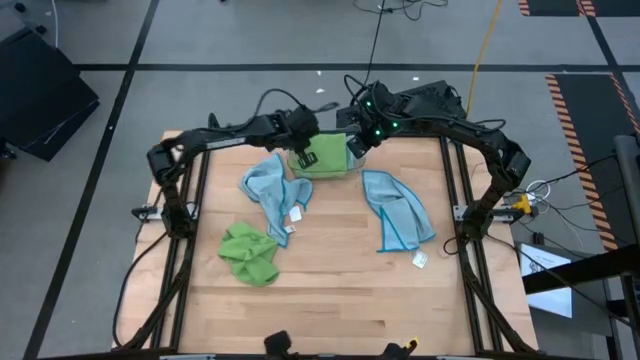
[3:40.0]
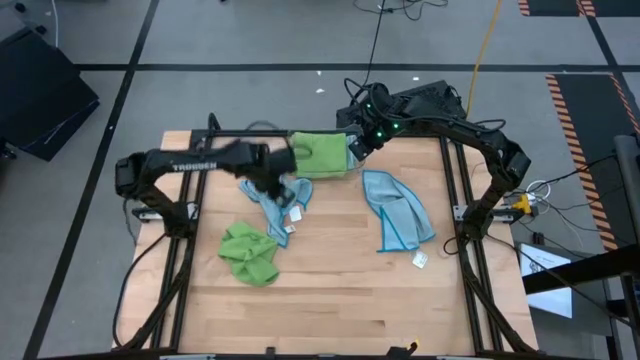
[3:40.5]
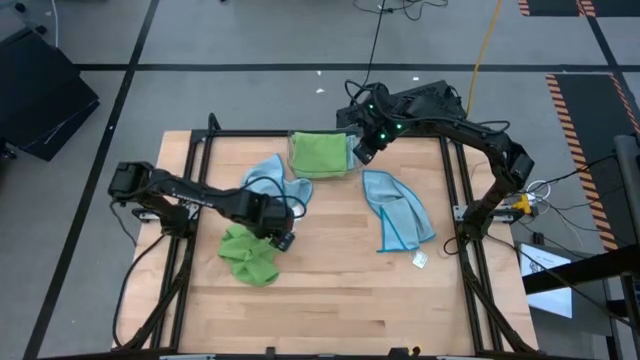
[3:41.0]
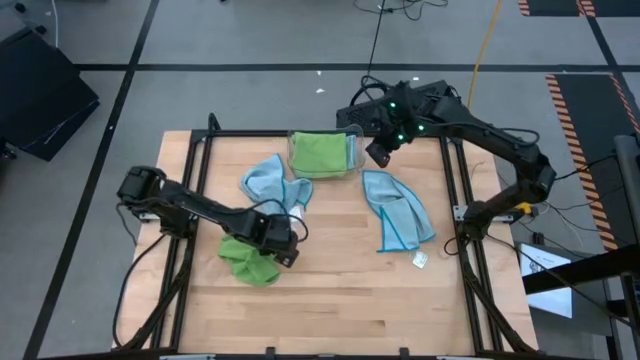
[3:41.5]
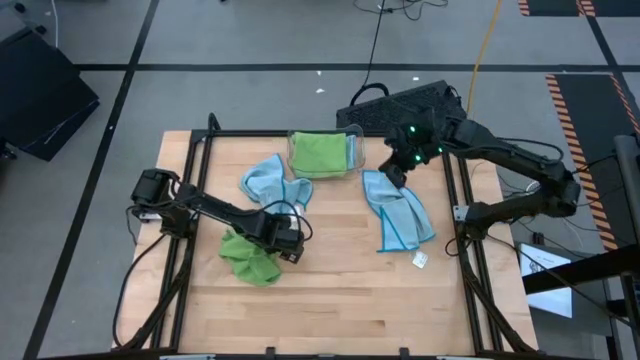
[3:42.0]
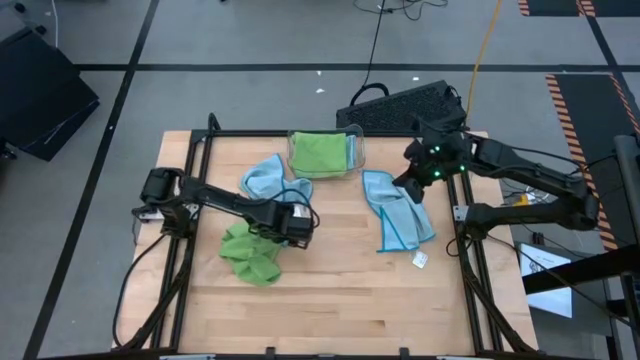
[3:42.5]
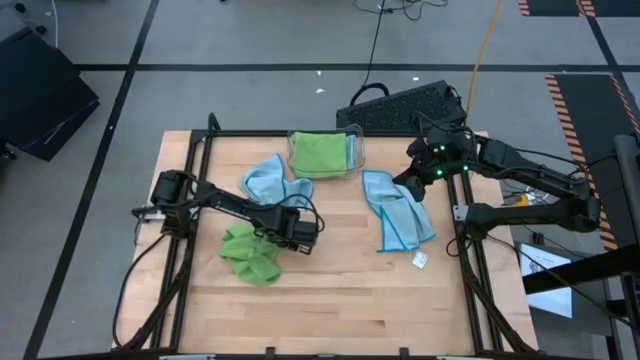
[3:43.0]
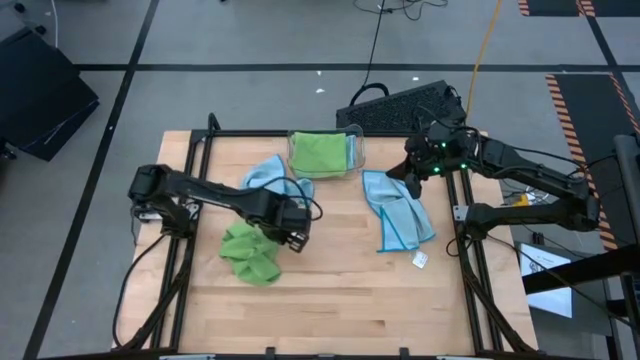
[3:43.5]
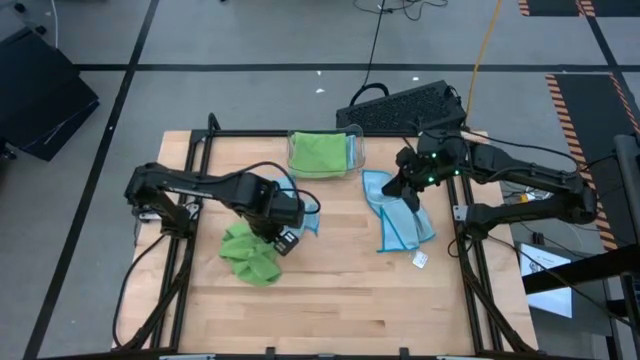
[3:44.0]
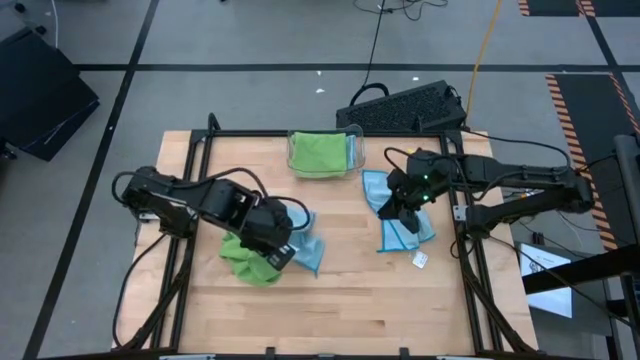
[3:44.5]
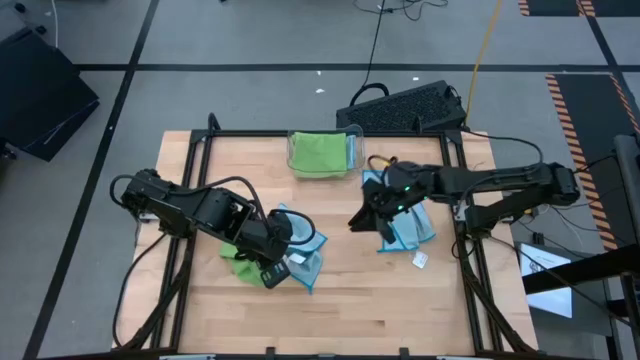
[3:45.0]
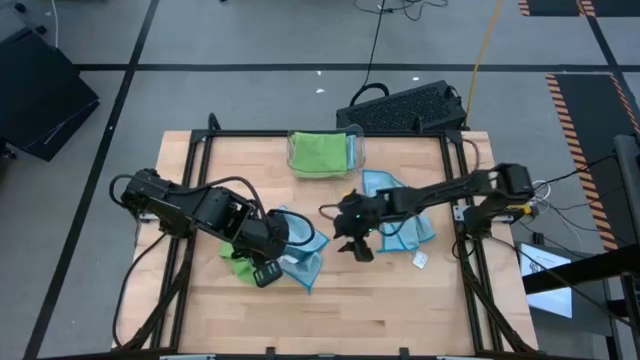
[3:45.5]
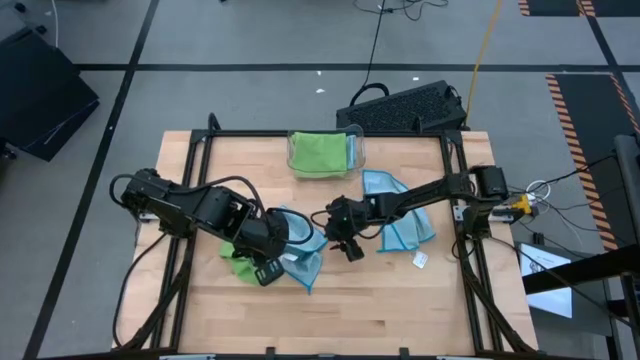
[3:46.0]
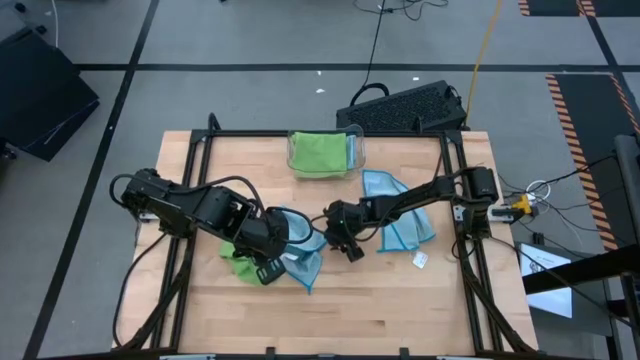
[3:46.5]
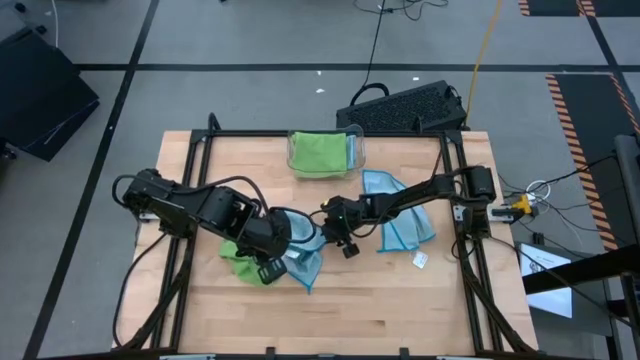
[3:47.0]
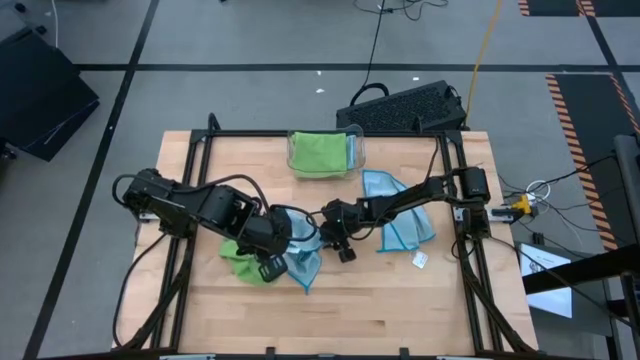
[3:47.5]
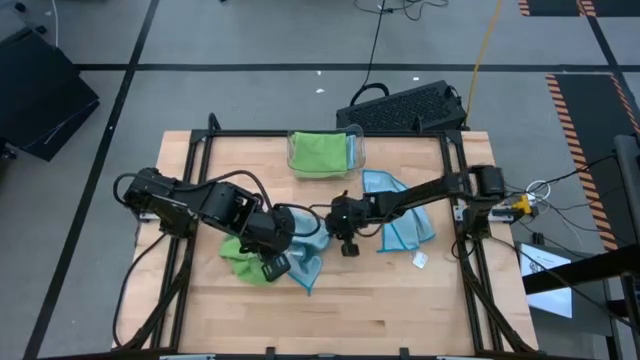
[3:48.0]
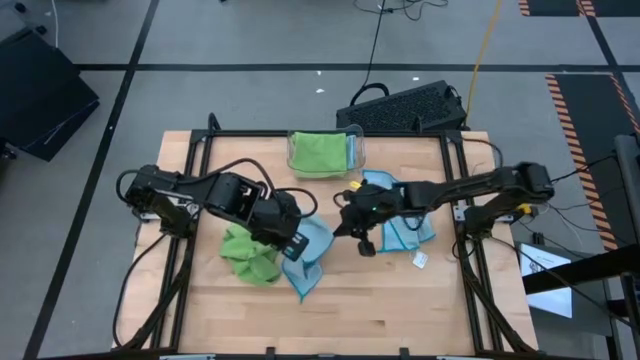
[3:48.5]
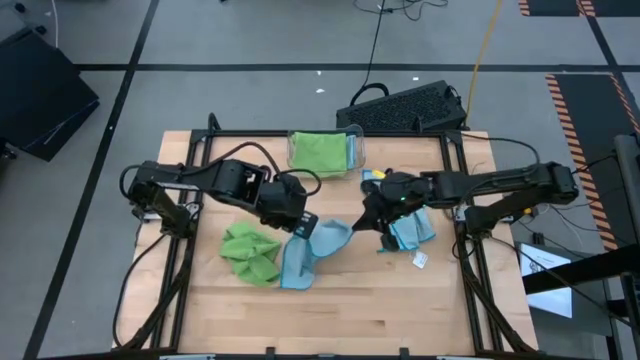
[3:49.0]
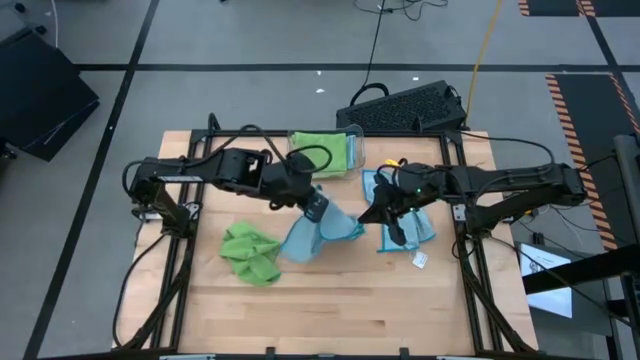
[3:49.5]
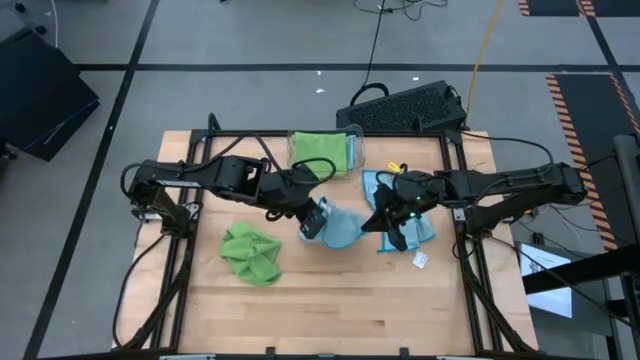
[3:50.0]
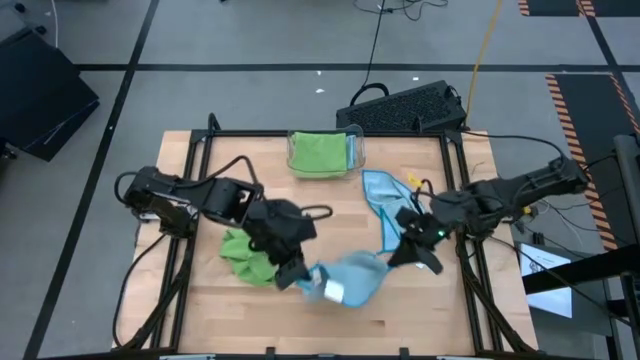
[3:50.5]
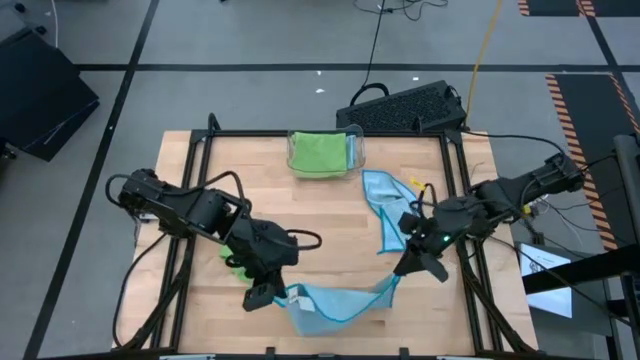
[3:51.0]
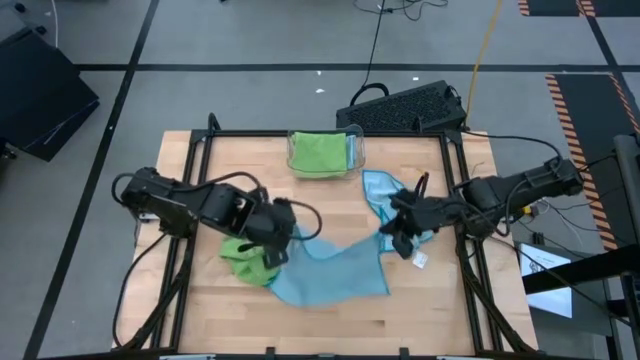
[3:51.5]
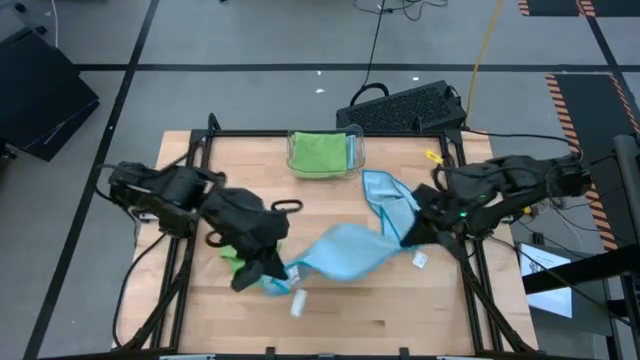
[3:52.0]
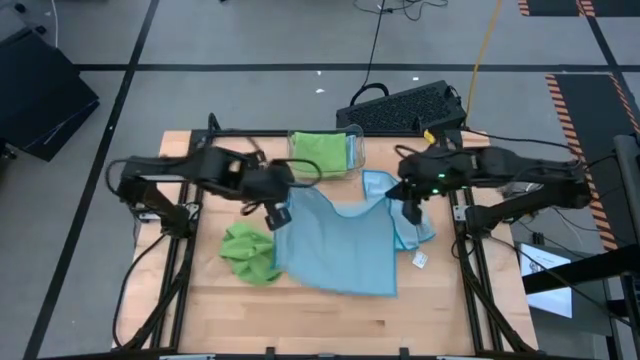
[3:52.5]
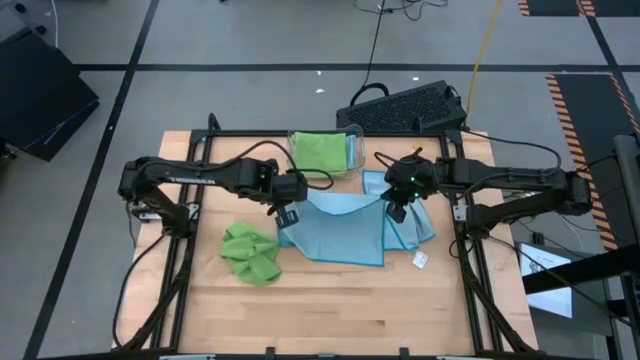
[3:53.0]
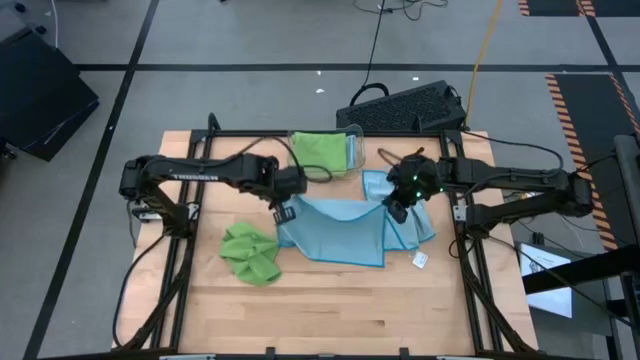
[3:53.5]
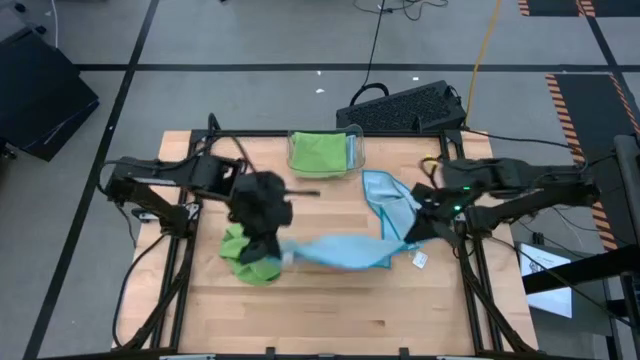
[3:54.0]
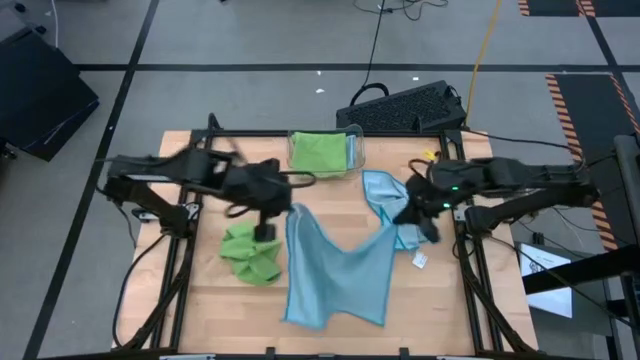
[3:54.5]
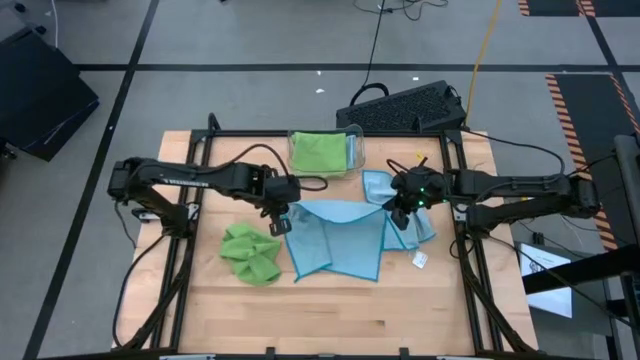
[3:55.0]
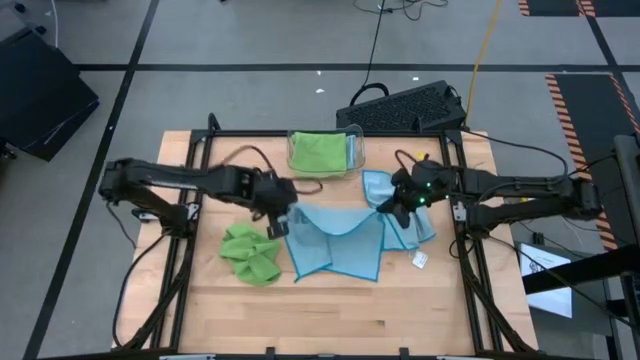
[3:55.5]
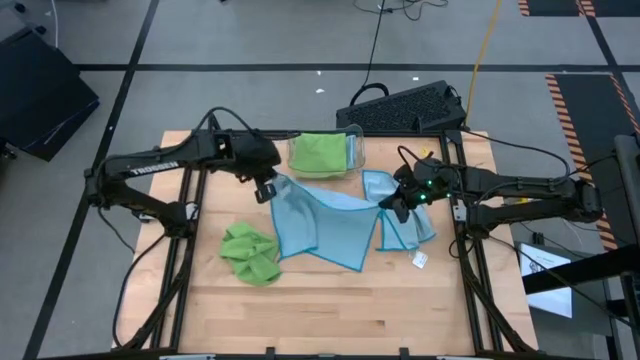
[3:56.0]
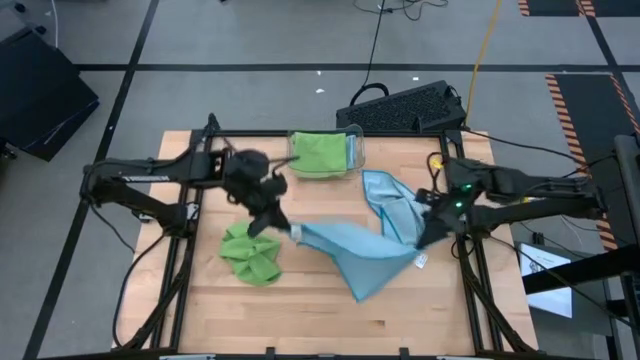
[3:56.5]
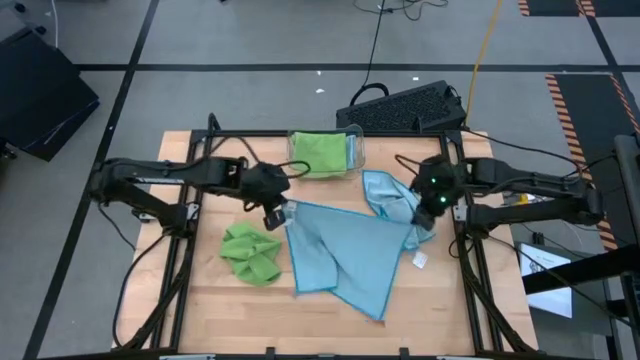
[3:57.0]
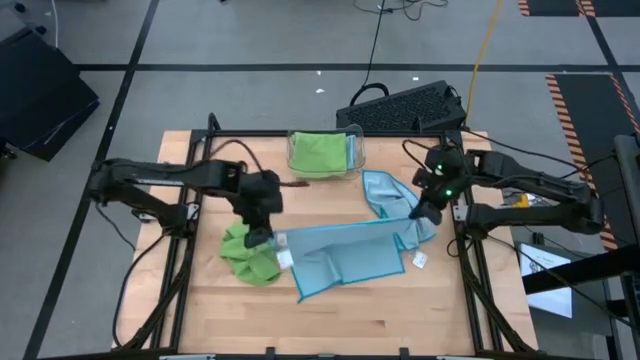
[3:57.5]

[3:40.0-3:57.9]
Task: Fold microfiber towels
Fold the left blue microfiber cloth

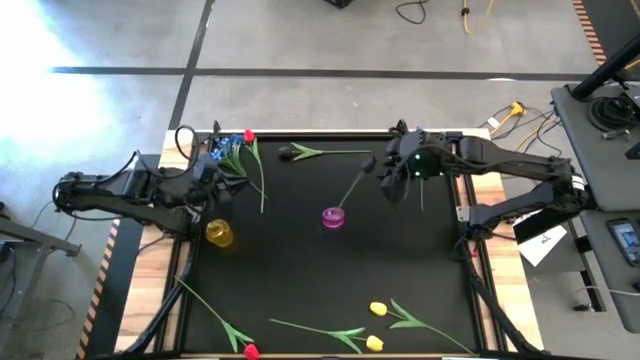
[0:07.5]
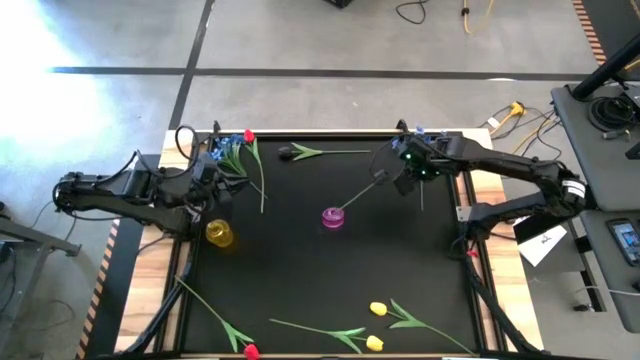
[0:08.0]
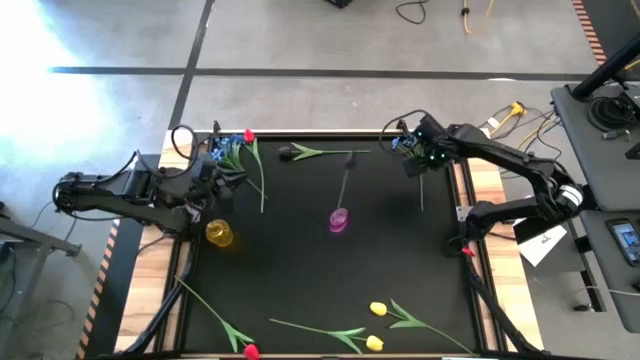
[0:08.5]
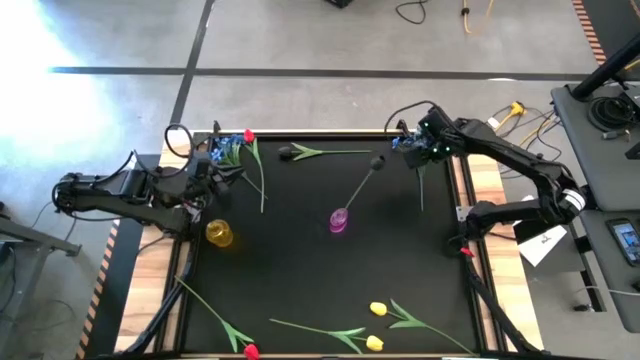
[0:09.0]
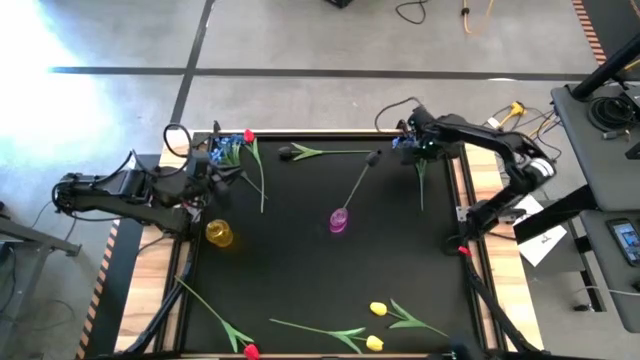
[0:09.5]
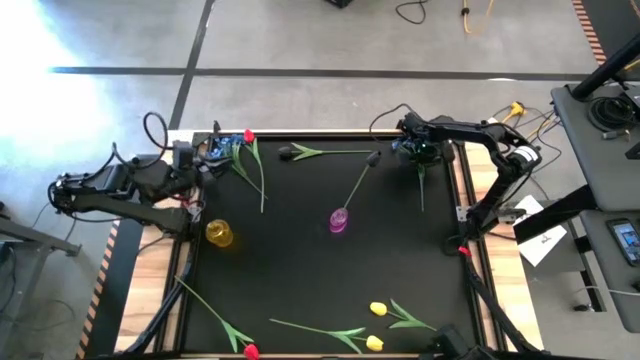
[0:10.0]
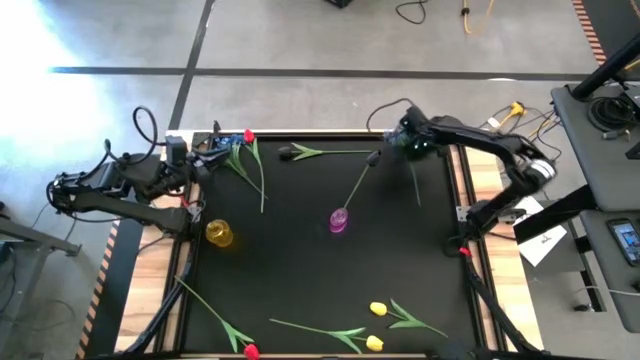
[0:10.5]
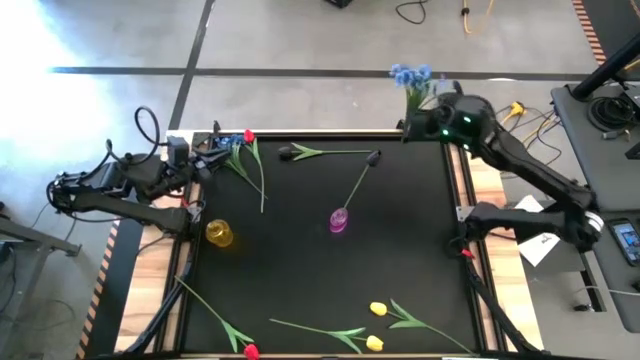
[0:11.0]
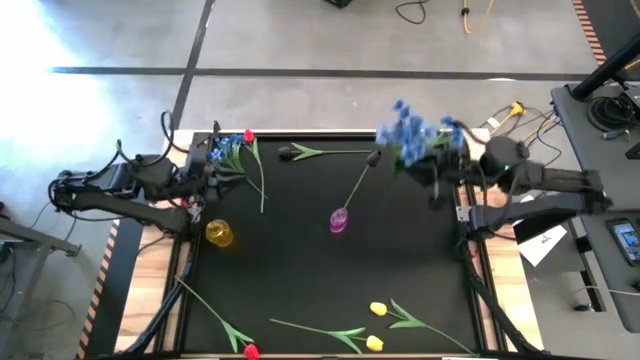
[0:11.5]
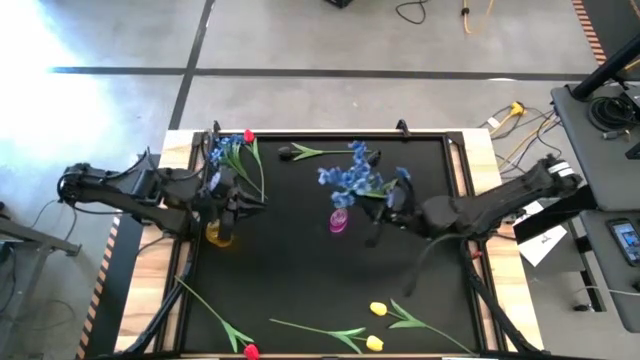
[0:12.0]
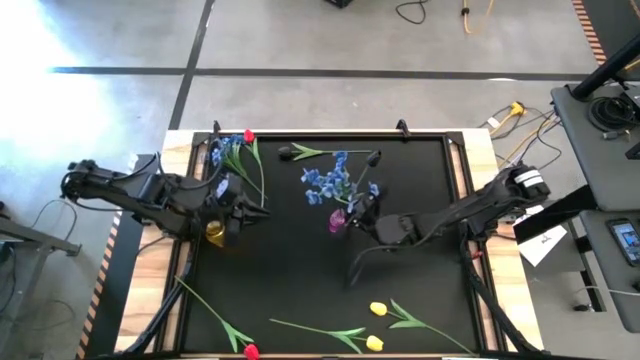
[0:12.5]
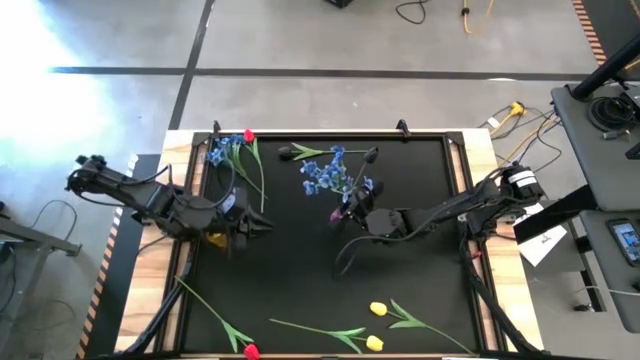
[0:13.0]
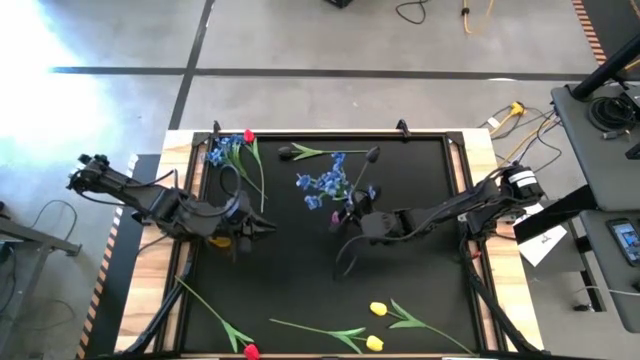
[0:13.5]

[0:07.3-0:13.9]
Task: Sort flowers into vase by color
Put the right blue flowers into the pink vase
